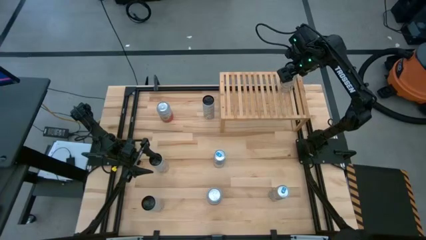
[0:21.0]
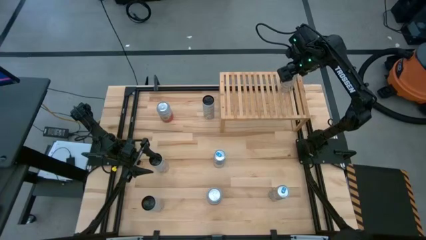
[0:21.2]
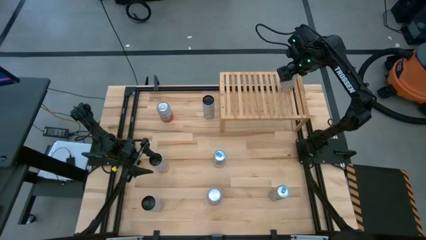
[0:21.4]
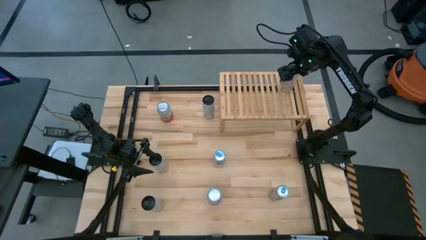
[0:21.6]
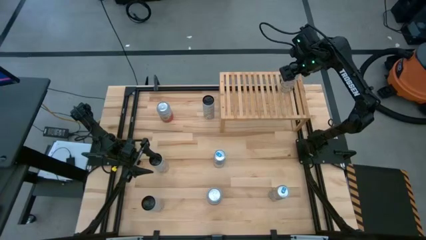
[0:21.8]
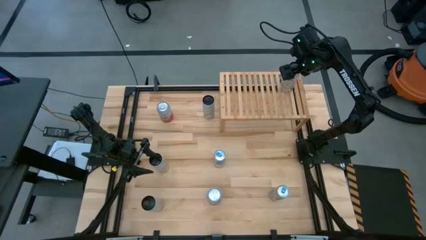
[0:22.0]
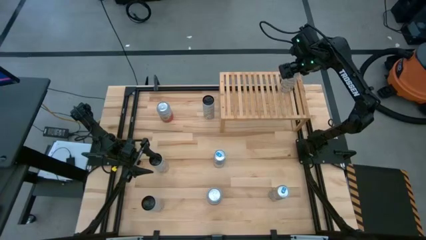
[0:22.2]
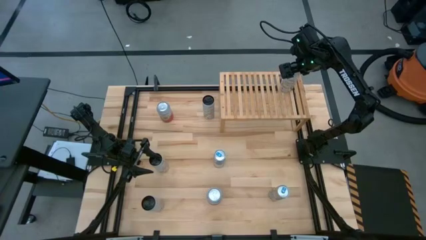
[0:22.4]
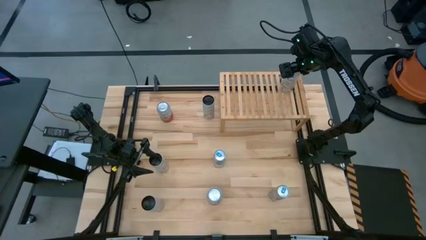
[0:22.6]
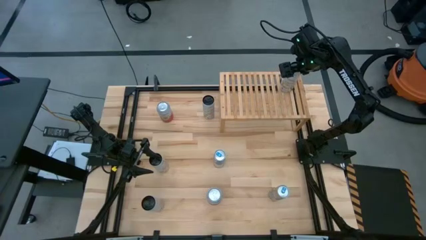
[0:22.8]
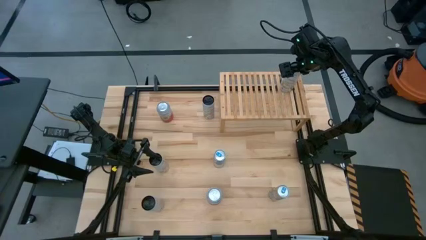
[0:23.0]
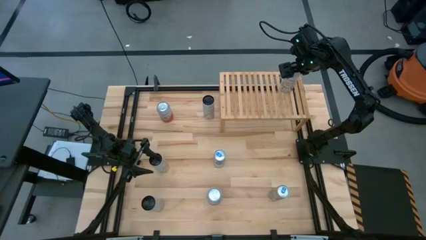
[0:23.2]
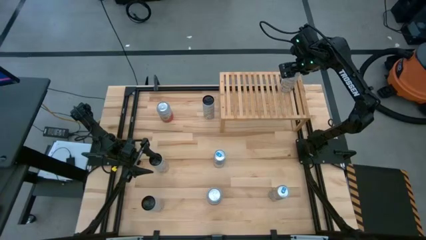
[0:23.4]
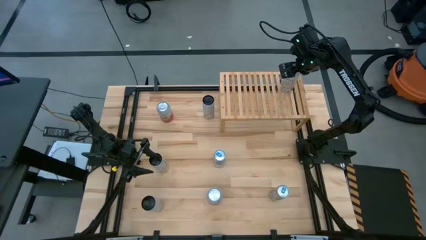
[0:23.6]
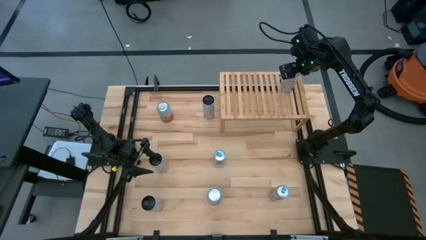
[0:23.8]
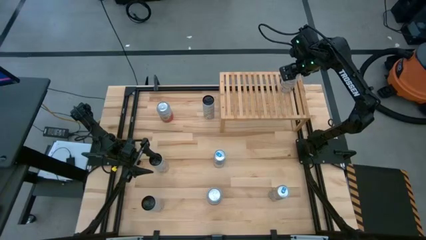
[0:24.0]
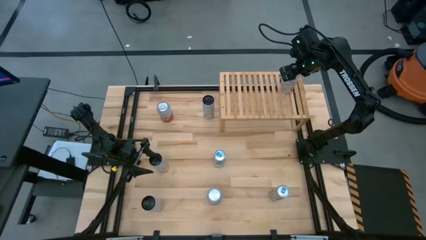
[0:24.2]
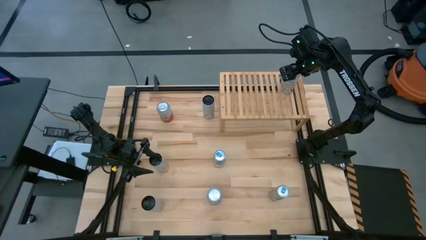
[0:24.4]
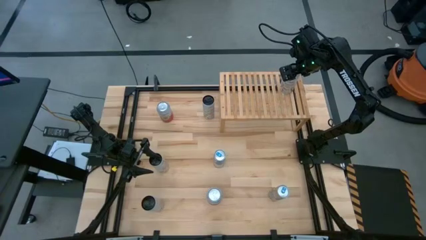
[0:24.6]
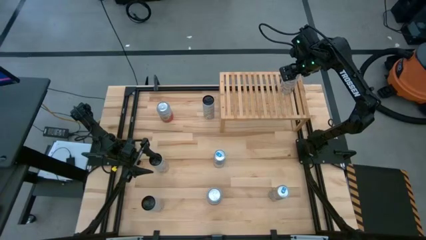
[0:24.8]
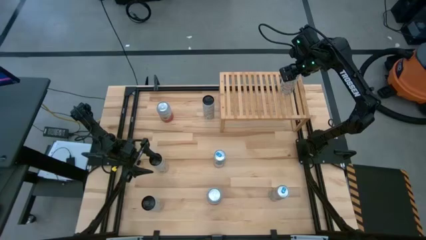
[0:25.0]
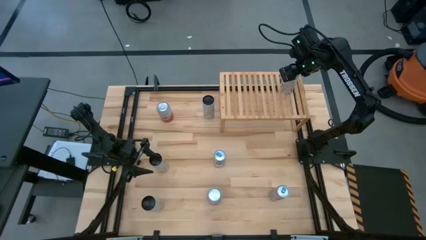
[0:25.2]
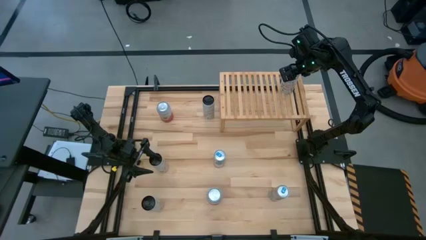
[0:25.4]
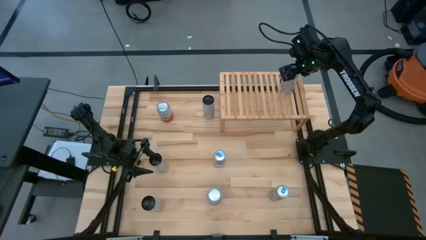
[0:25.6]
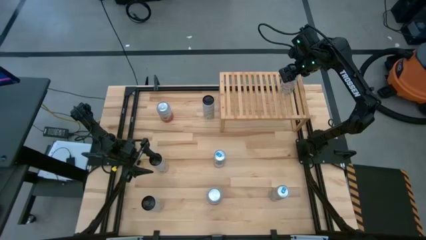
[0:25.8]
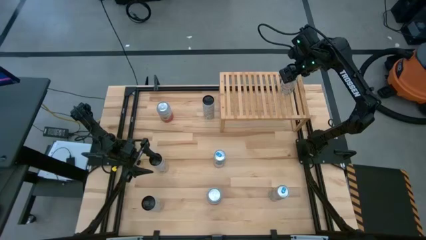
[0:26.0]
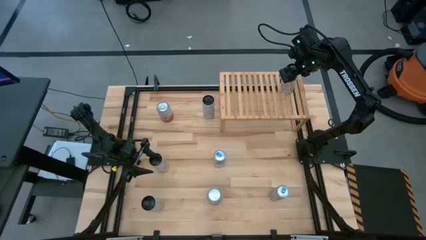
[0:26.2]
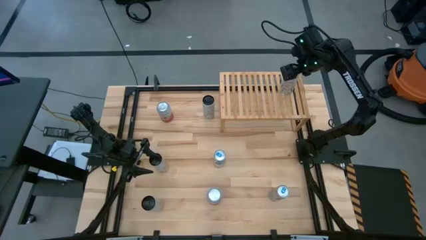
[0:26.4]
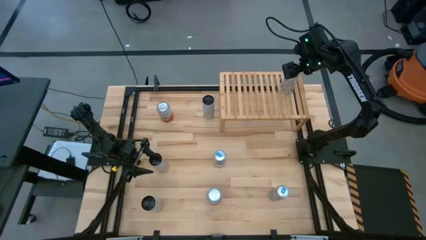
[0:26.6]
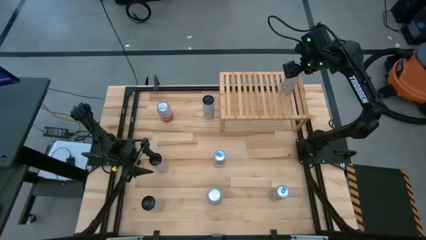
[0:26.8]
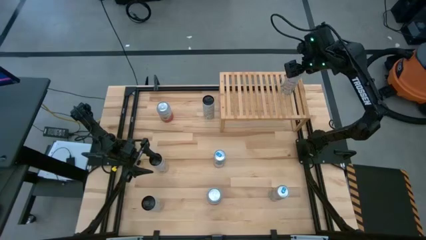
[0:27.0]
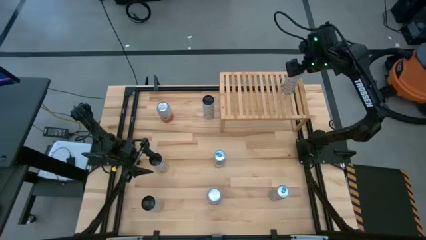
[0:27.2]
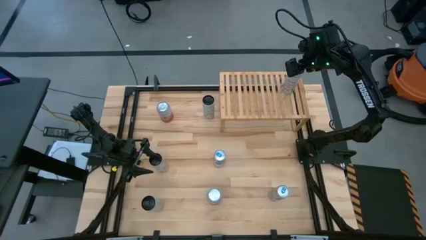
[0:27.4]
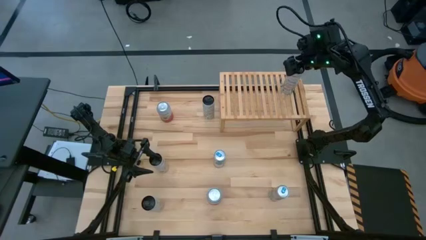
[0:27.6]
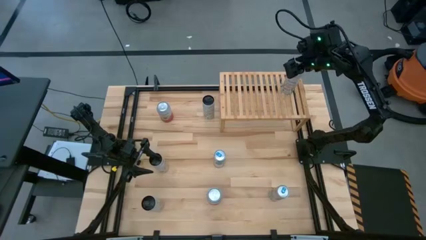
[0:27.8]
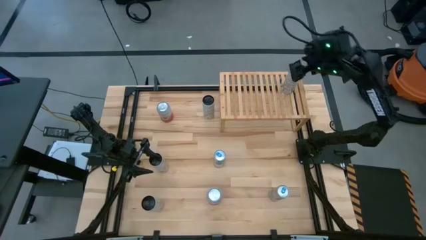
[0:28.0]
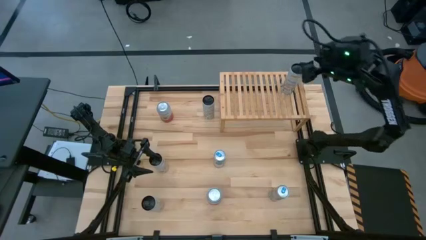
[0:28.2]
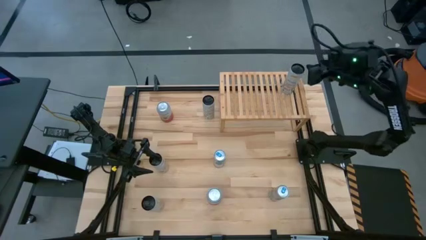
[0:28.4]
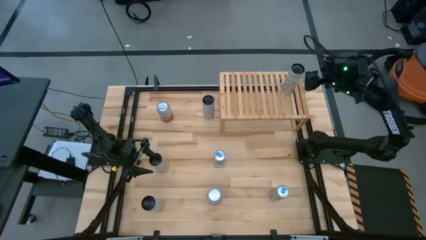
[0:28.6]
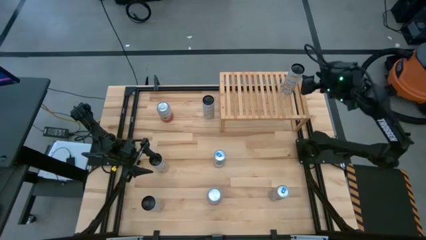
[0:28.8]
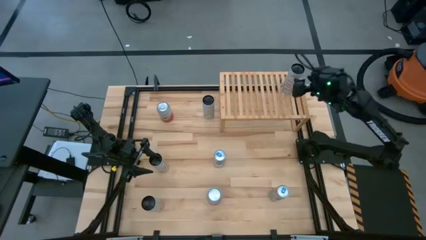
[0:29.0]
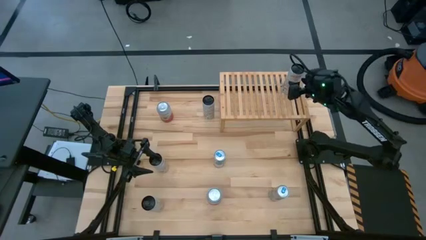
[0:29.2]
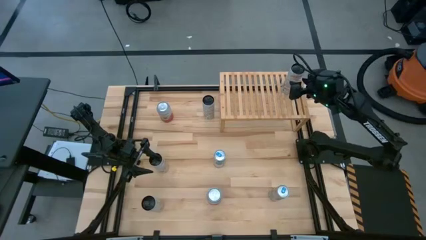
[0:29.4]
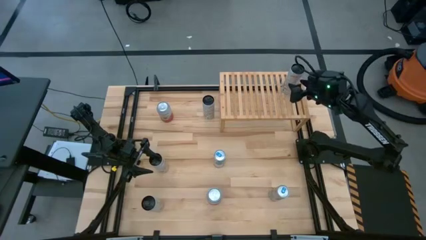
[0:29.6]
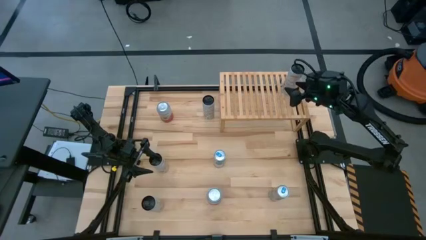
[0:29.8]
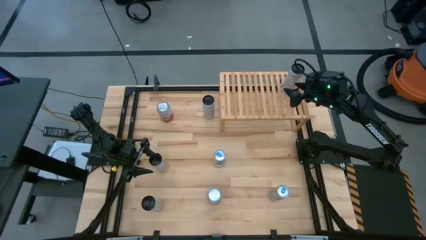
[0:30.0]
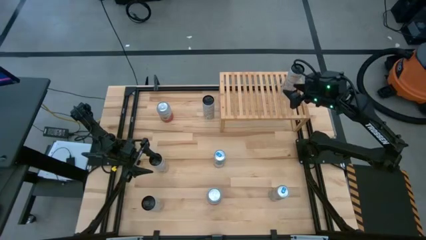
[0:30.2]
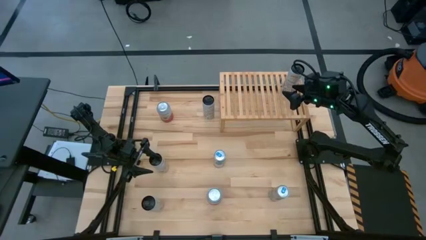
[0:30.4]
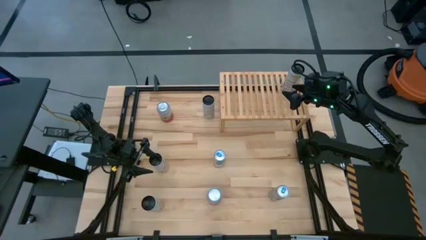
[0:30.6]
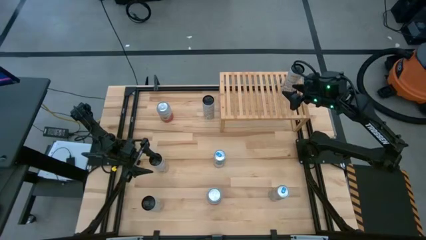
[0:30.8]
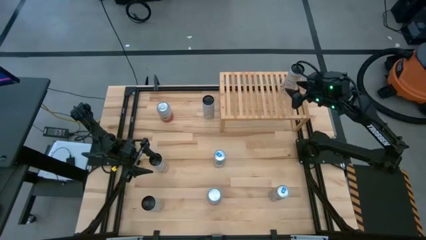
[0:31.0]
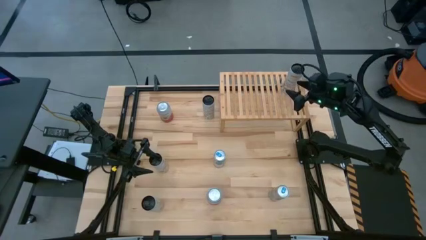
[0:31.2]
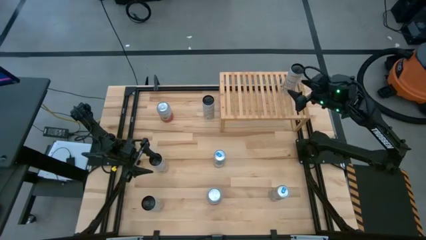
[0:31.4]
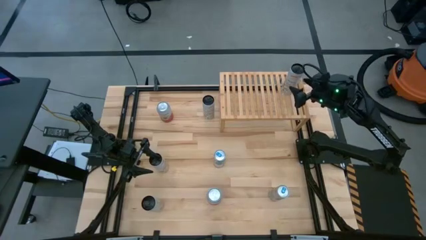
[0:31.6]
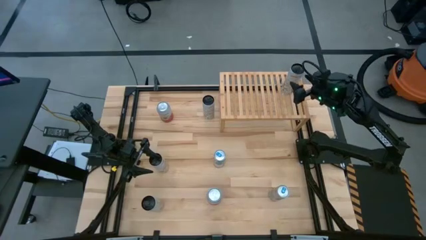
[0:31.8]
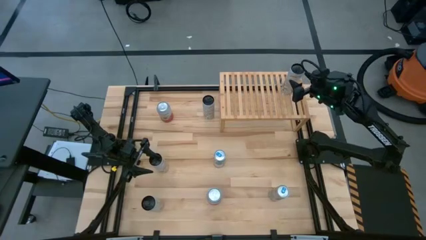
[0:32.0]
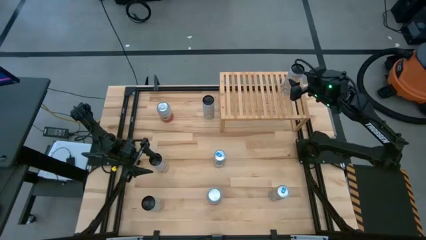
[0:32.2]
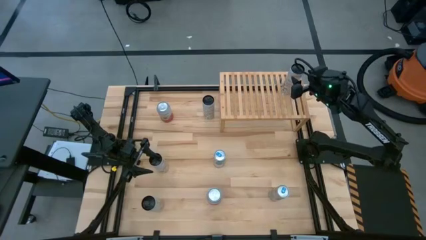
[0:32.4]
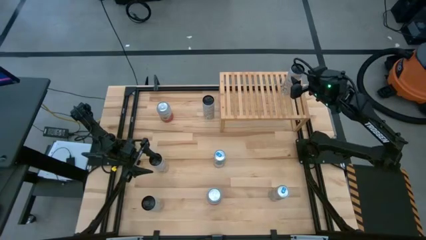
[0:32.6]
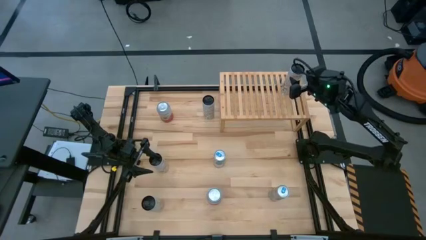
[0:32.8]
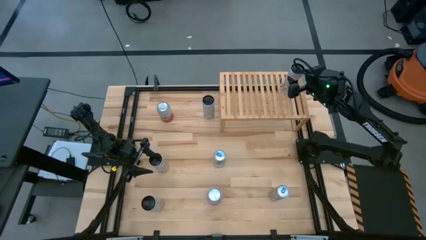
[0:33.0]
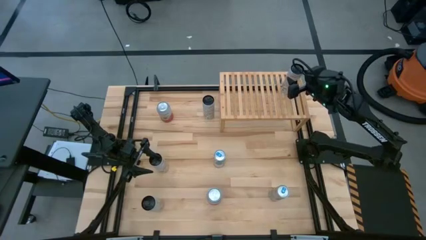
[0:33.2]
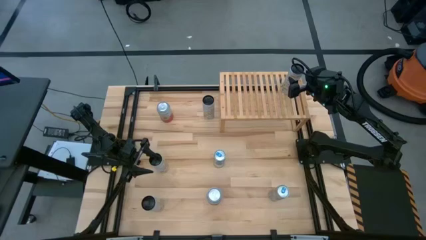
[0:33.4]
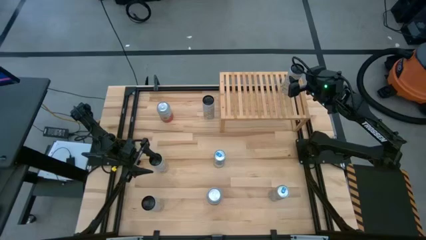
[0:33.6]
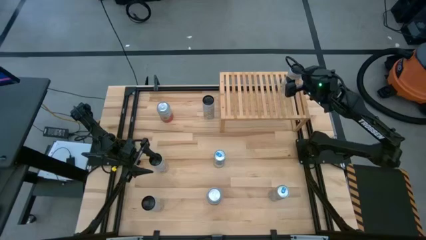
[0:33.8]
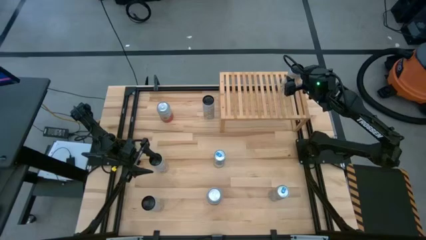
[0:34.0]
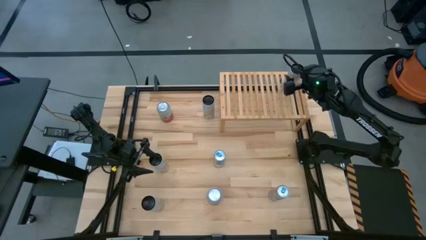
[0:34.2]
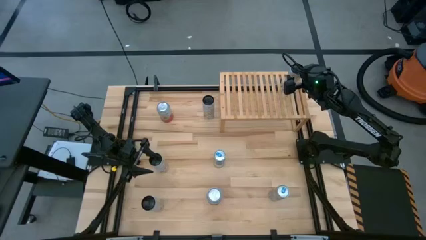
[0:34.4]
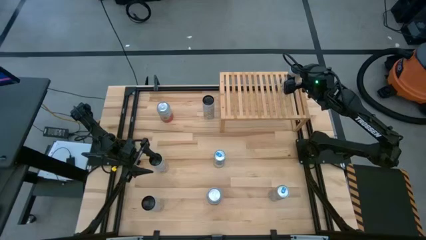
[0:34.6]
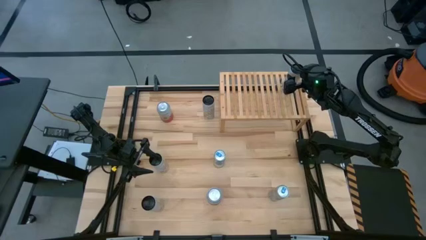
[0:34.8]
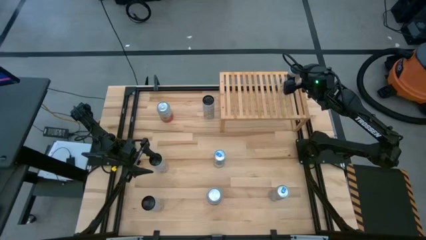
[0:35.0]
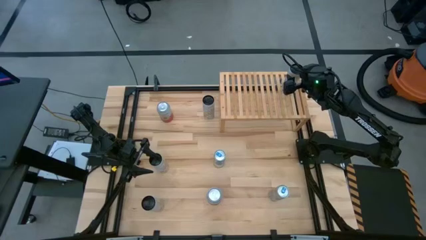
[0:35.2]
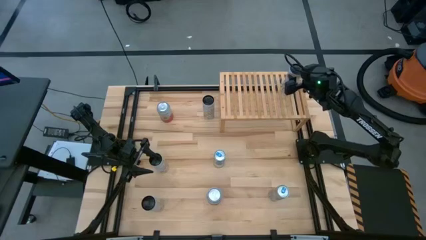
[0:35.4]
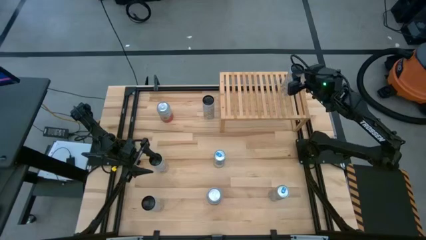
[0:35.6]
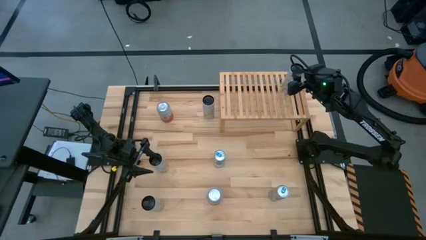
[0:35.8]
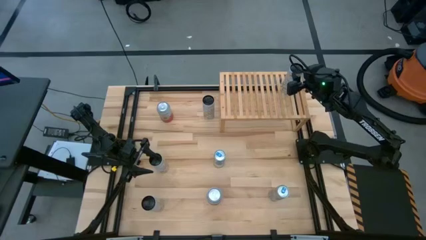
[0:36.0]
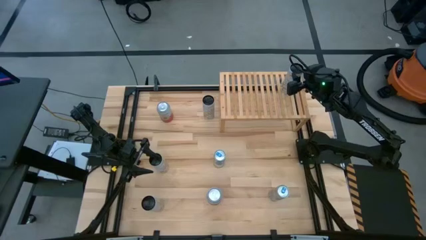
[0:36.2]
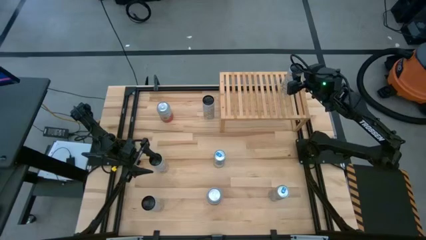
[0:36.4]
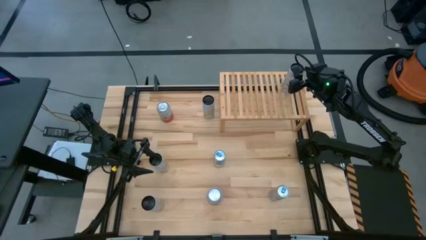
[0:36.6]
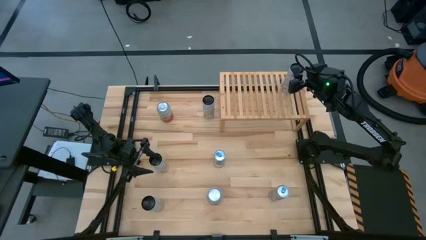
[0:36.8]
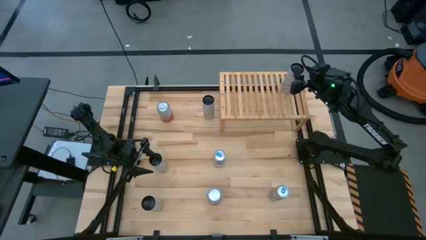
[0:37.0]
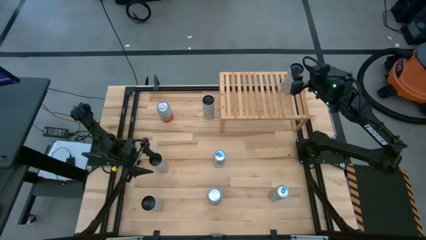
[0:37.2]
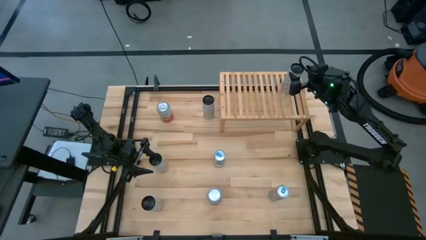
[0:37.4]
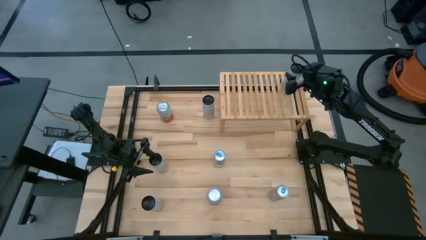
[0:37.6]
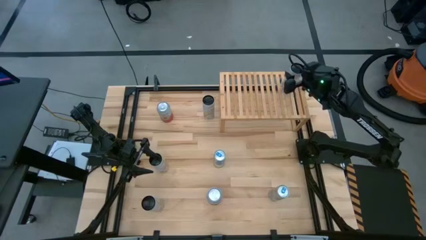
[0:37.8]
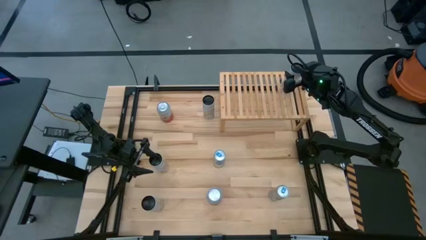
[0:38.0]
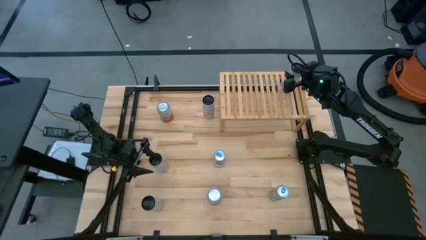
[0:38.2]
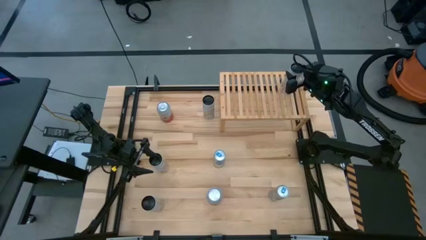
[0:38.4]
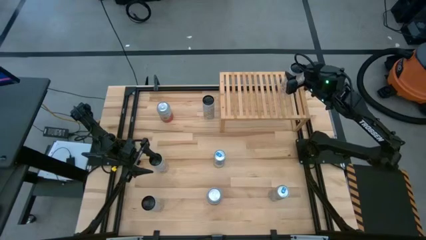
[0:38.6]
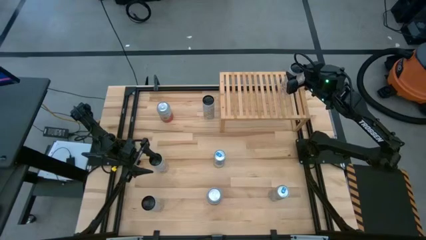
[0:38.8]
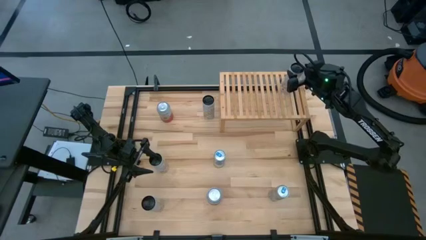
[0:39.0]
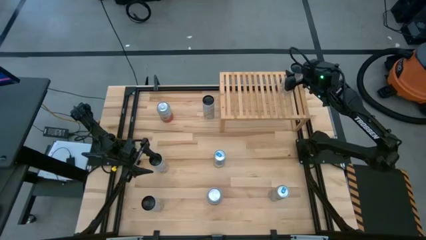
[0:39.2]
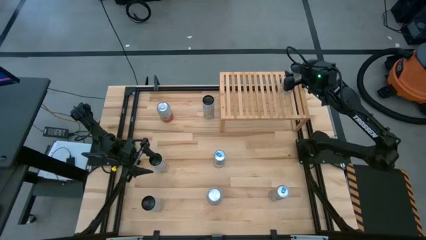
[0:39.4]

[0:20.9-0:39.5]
Task: Place canned beverage on shelf
Put the bottom white-yellow soda can on the shelf
